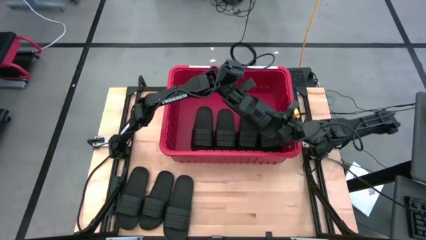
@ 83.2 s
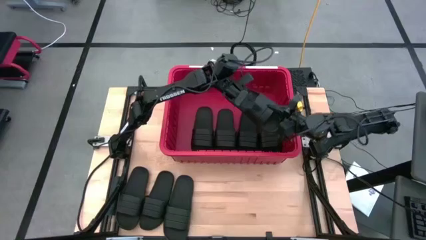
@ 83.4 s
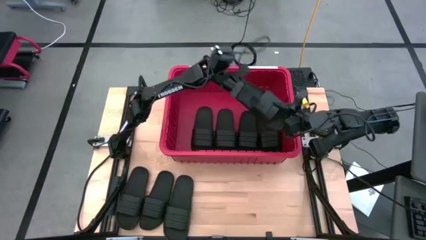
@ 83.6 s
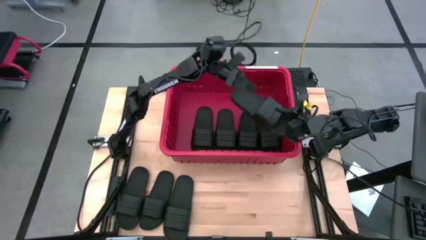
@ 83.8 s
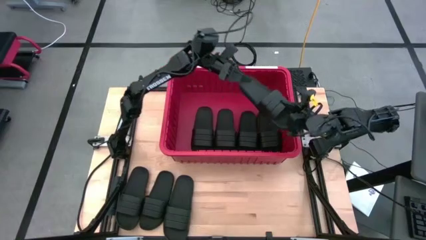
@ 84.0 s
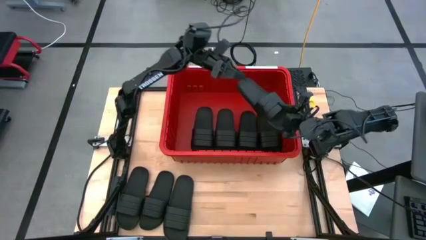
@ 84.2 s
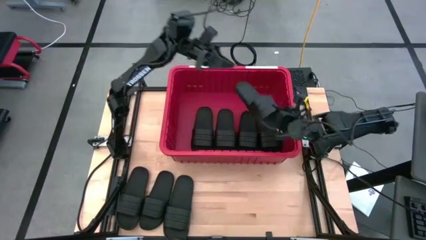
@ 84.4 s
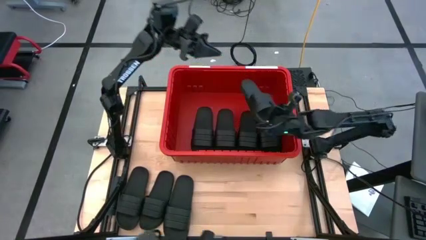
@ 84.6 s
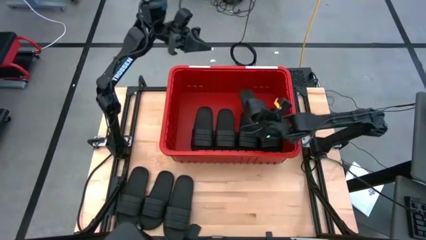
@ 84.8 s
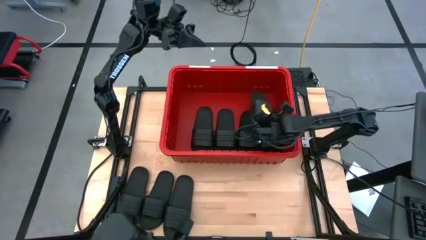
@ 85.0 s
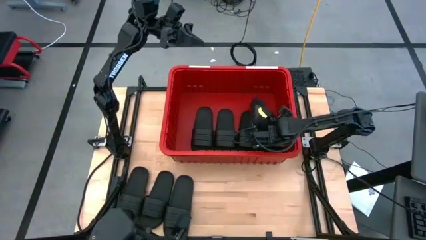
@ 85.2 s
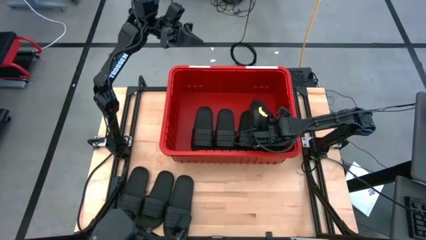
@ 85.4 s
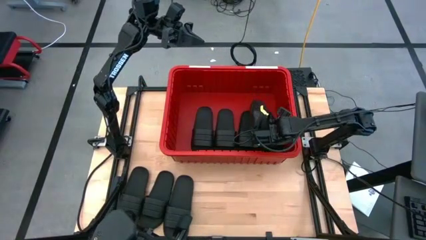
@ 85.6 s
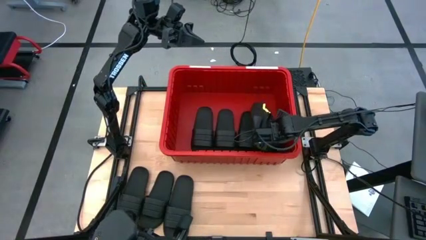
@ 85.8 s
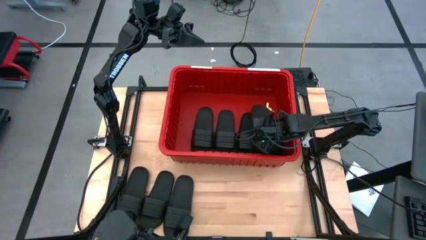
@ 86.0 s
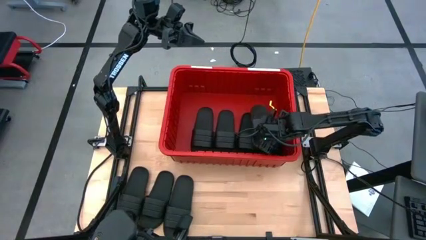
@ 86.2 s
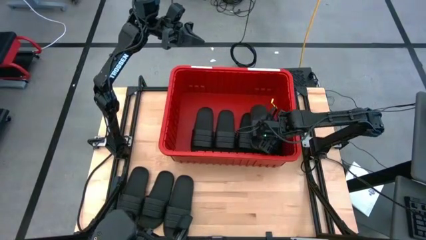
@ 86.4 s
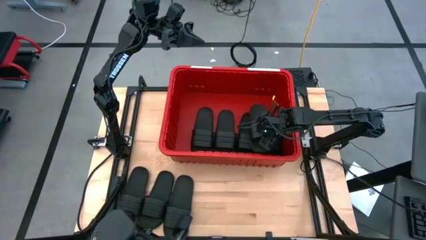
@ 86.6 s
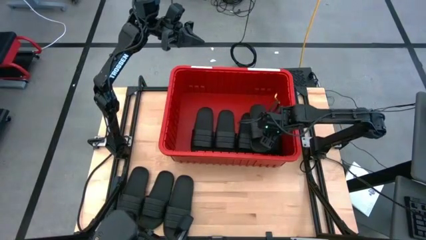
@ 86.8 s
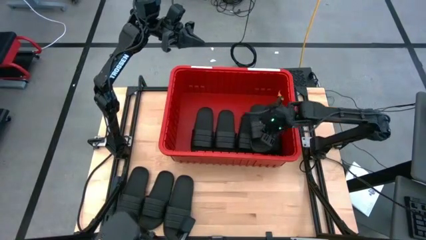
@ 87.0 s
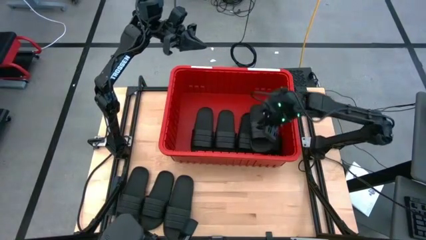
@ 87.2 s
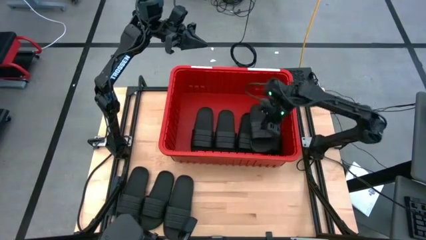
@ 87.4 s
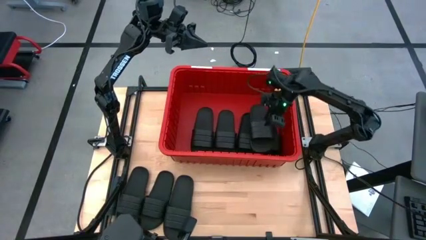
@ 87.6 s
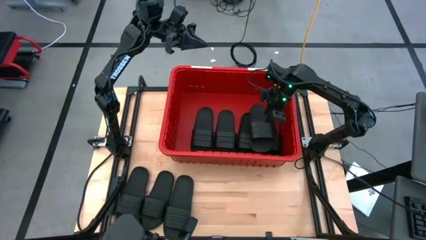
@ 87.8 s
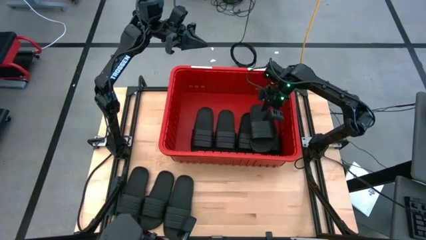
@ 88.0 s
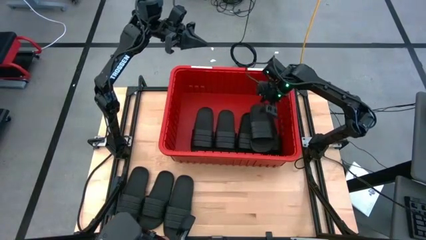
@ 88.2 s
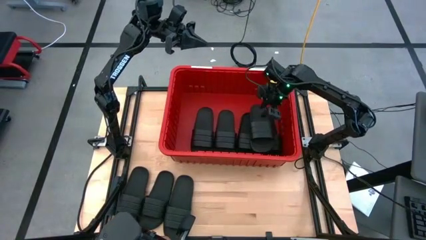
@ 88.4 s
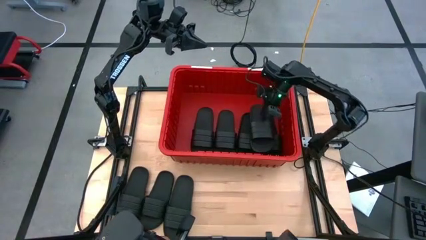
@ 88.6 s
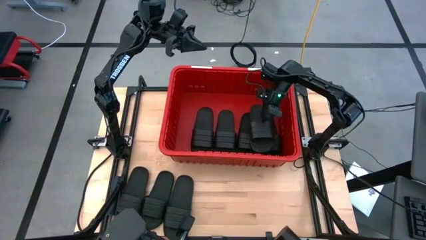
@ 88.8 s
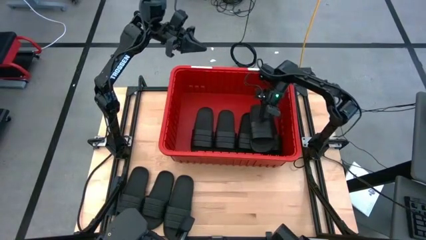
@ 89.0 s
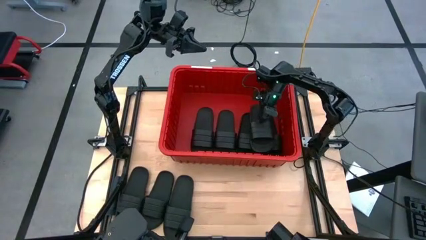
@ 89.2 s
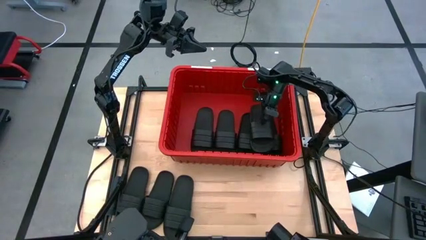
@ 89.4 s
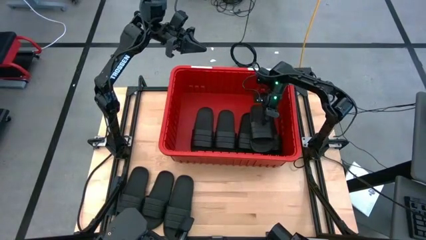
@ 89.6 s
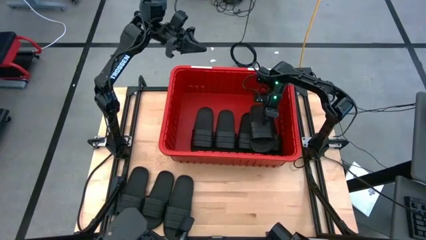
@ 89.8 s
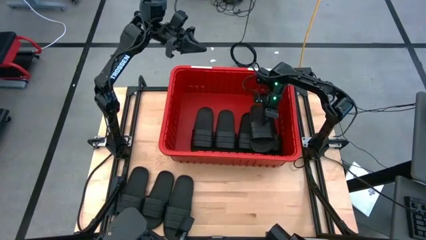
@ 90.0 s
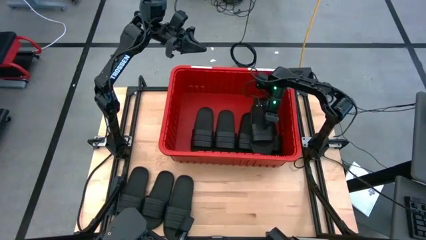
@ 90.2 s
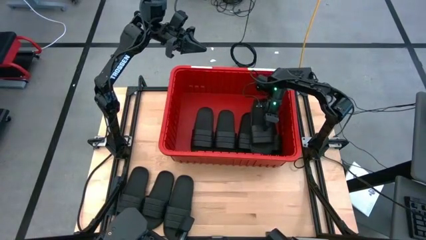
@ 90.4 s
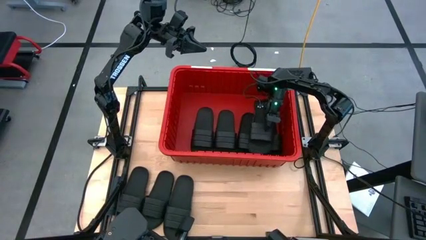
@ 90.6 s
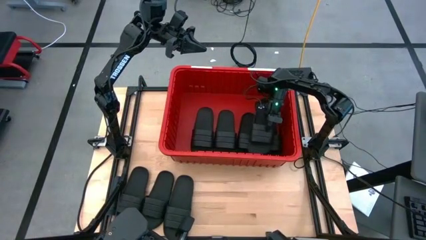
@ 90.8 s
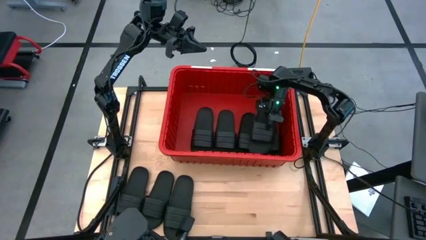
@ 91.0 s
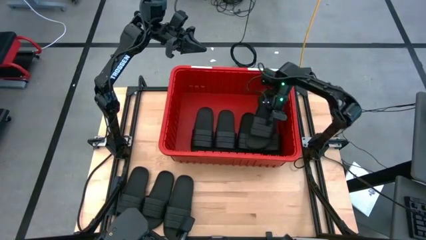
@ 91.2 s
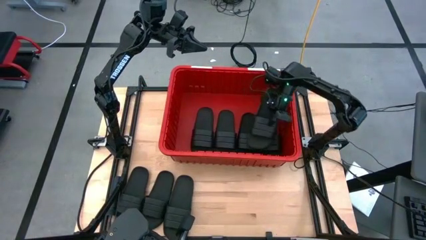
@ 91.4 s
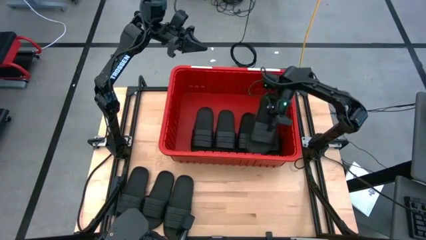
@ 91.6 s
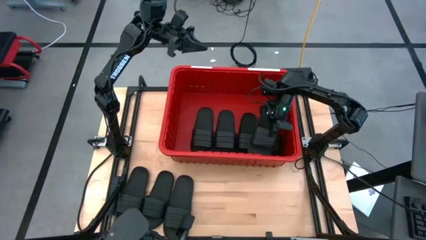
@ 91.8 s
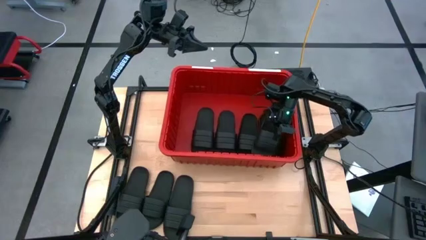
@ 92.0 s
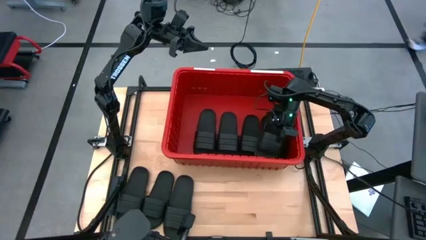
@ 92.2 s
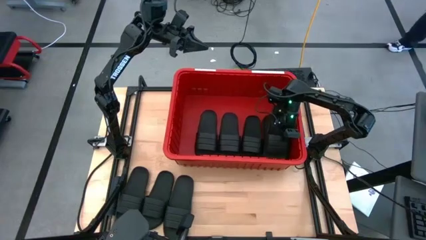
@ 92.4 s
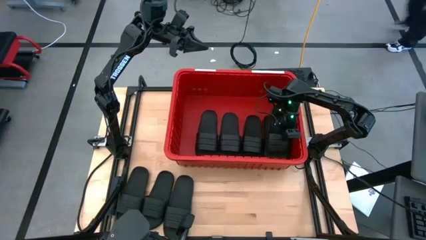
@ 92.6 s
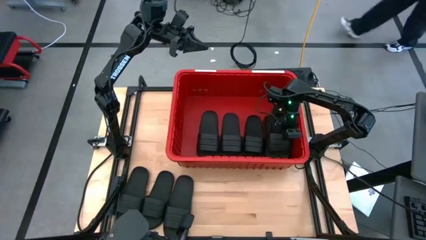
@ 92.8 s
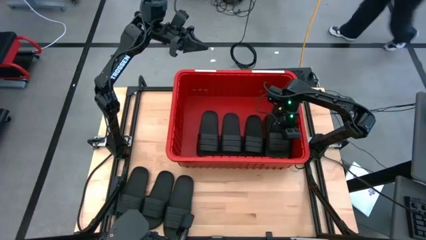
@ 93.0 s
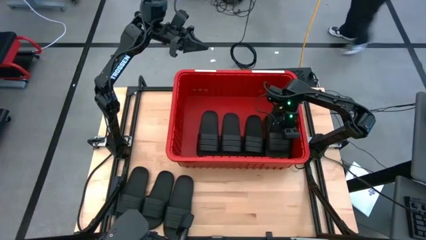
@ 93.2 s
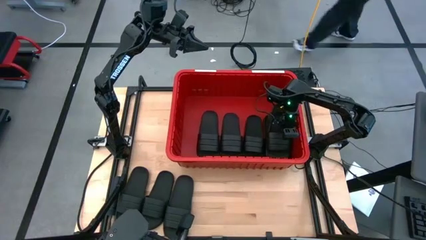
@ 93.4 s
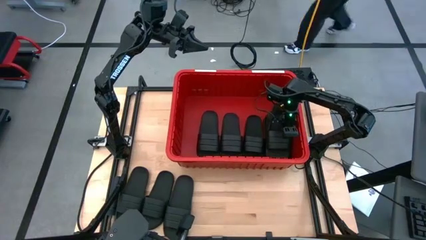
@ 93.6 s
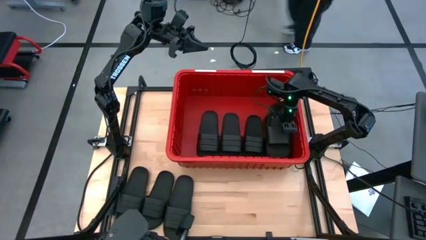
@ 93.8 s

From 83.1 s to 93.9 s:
Task: Pick and place slides into bin
Put the black slide into the red bin
